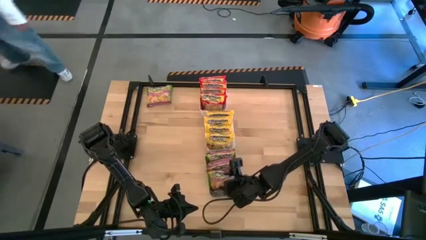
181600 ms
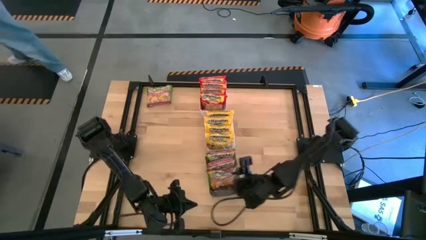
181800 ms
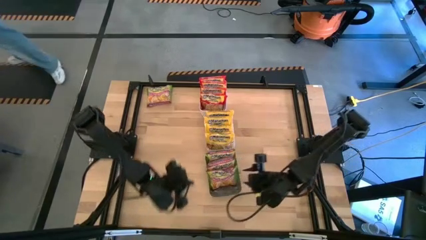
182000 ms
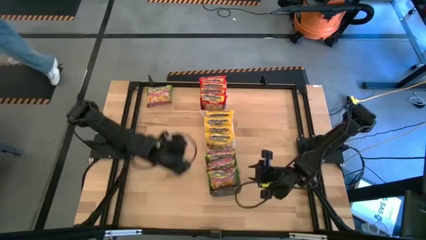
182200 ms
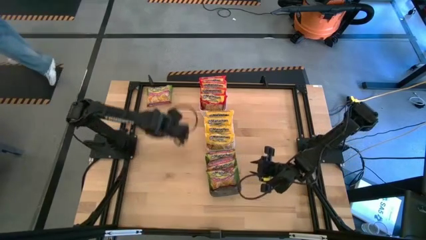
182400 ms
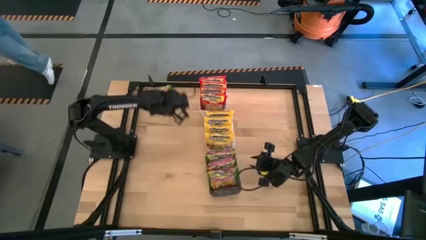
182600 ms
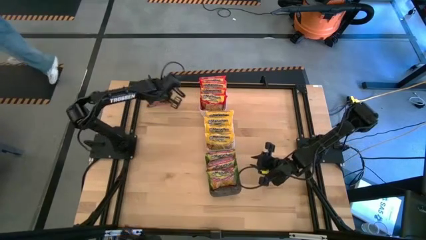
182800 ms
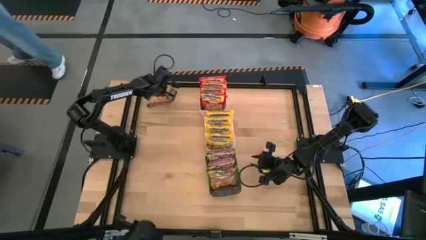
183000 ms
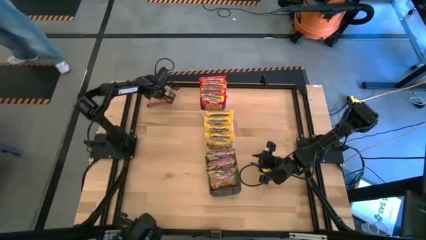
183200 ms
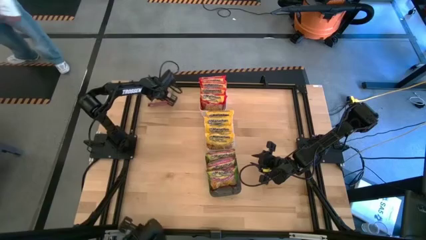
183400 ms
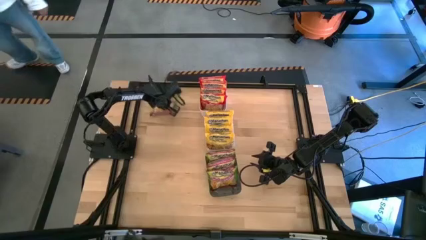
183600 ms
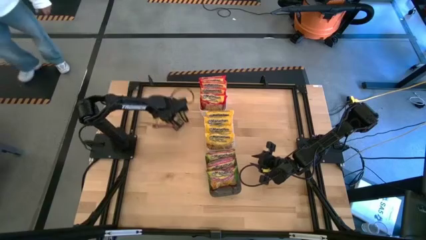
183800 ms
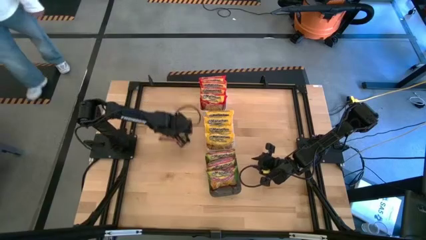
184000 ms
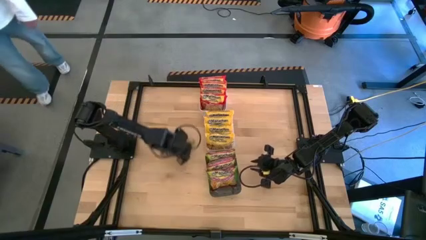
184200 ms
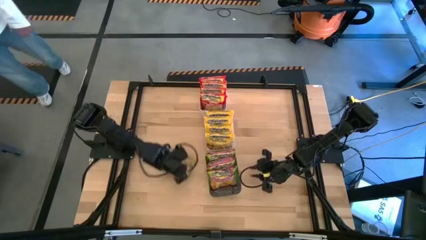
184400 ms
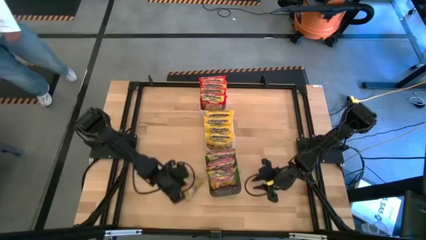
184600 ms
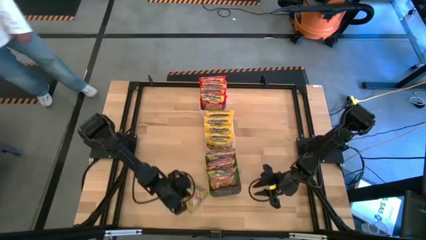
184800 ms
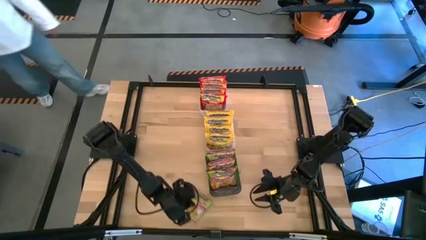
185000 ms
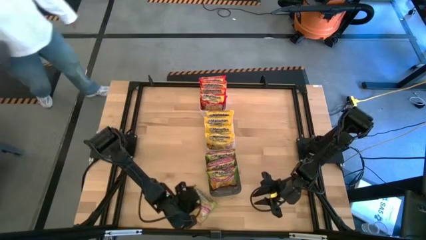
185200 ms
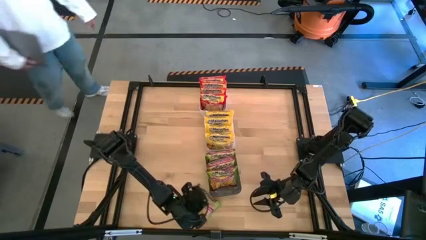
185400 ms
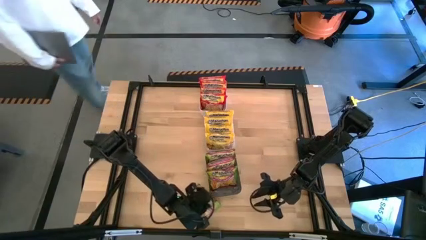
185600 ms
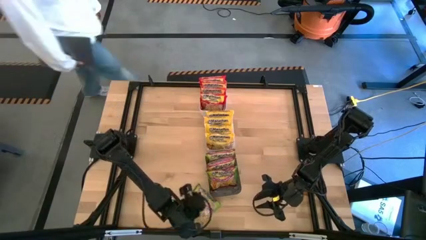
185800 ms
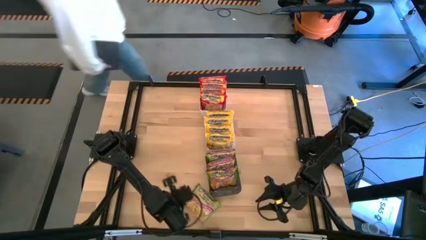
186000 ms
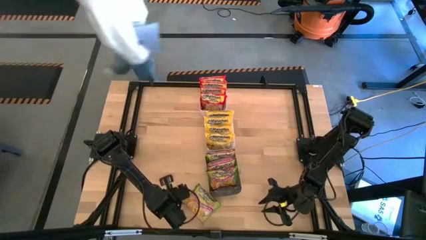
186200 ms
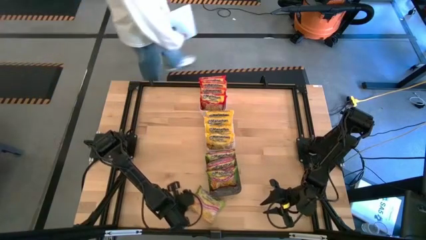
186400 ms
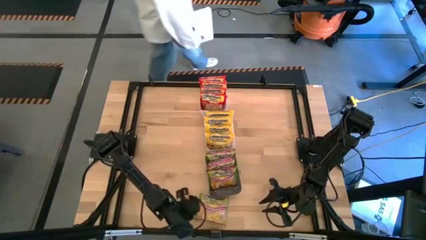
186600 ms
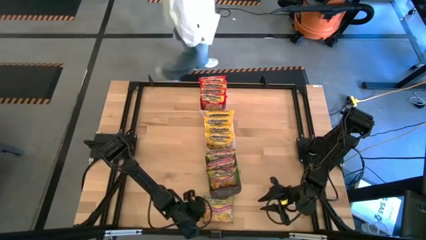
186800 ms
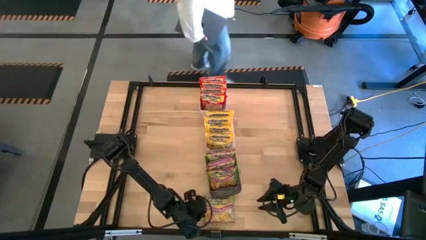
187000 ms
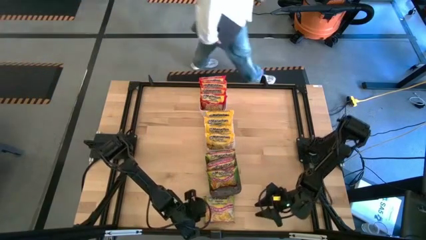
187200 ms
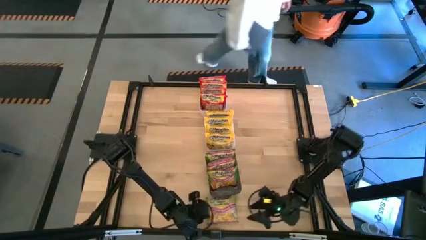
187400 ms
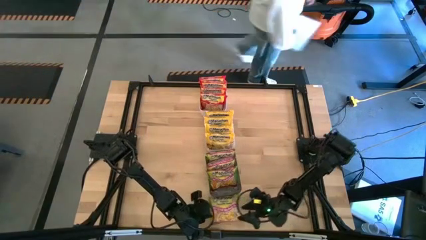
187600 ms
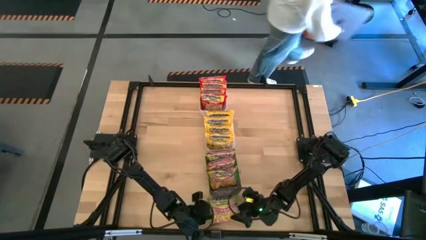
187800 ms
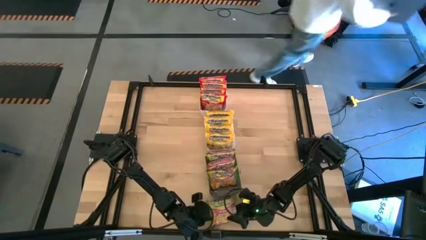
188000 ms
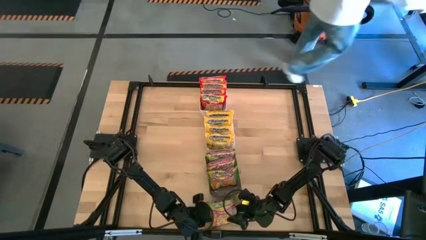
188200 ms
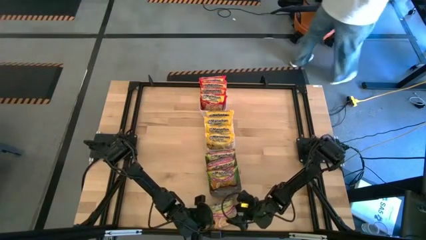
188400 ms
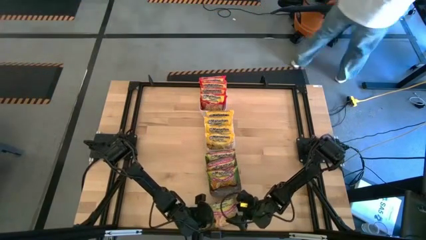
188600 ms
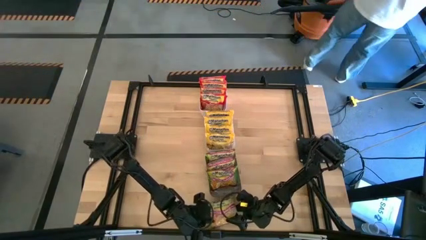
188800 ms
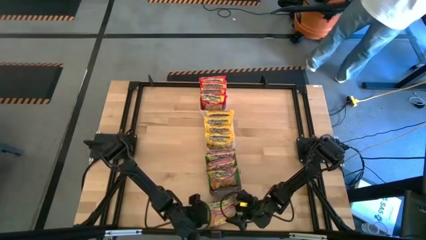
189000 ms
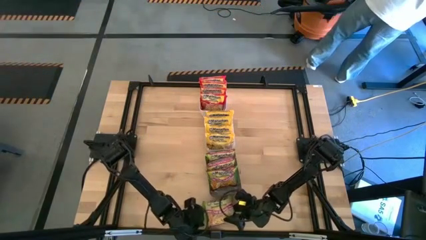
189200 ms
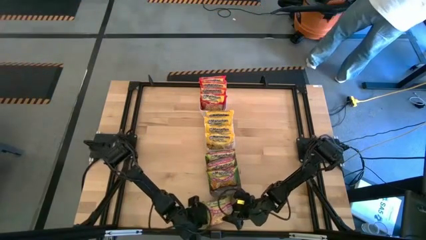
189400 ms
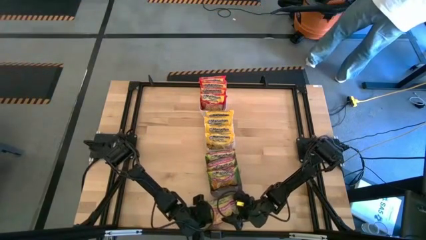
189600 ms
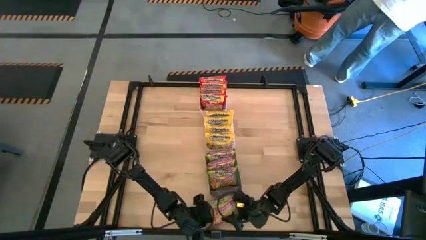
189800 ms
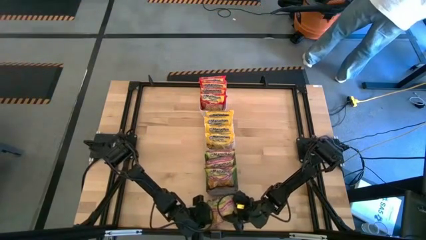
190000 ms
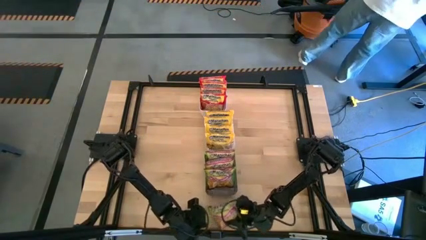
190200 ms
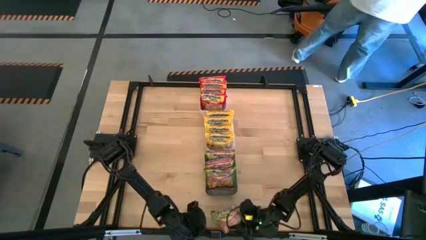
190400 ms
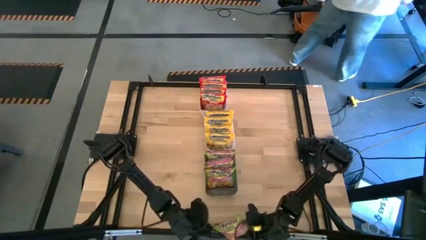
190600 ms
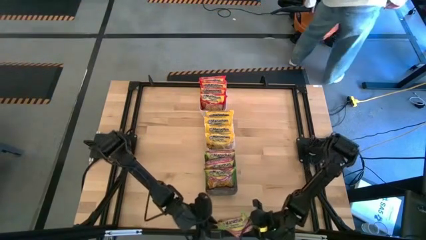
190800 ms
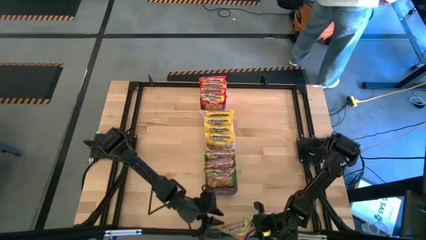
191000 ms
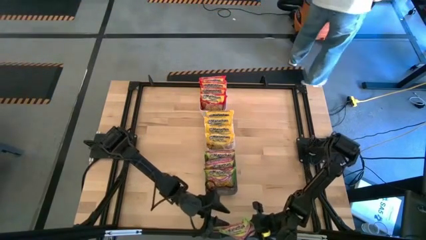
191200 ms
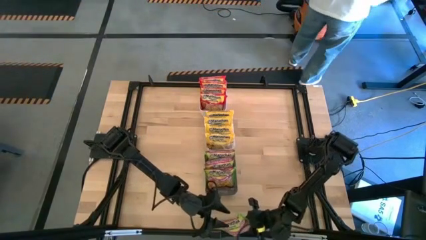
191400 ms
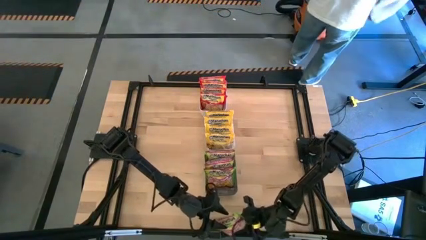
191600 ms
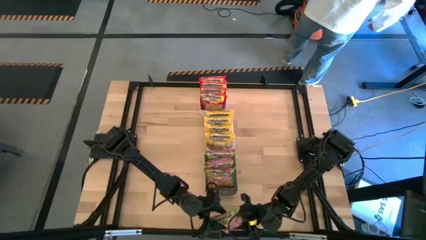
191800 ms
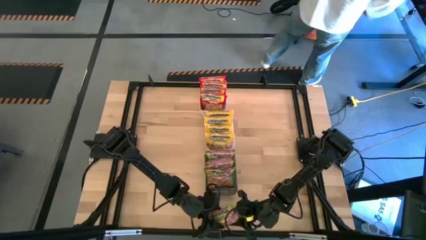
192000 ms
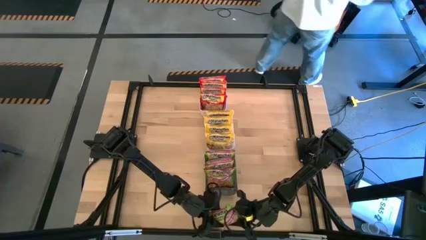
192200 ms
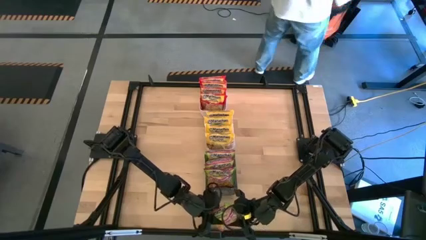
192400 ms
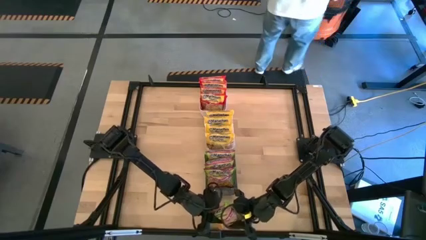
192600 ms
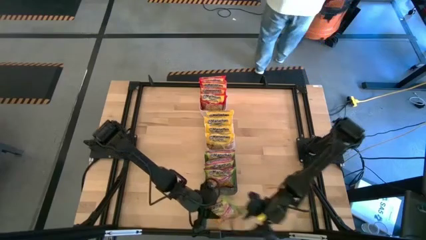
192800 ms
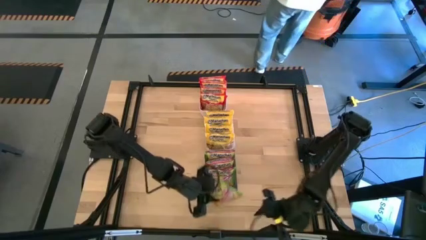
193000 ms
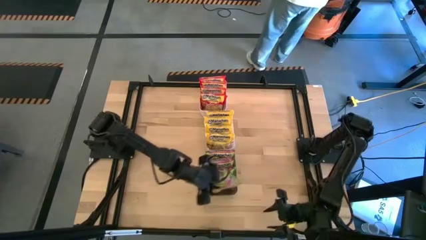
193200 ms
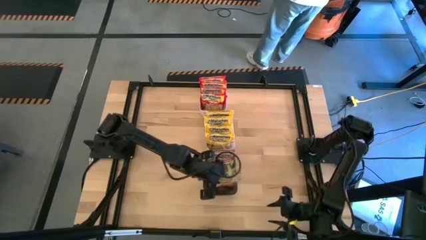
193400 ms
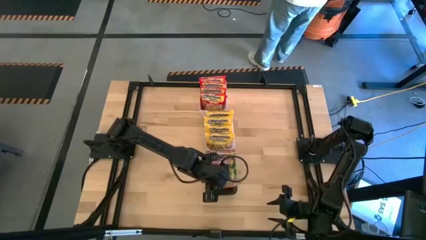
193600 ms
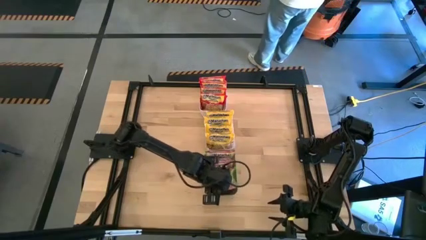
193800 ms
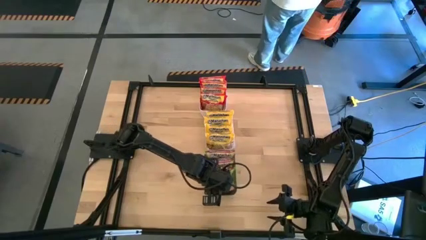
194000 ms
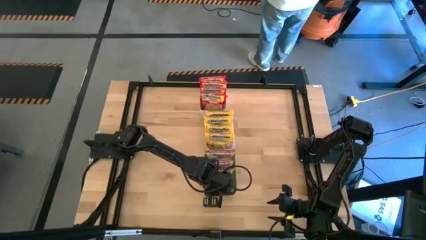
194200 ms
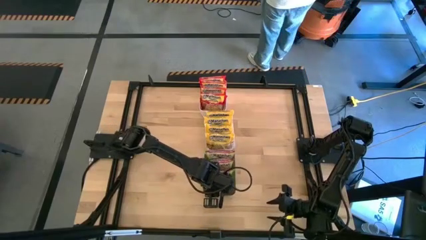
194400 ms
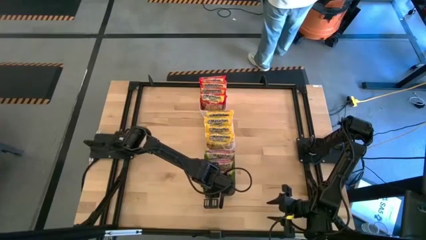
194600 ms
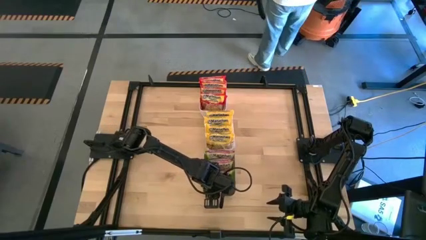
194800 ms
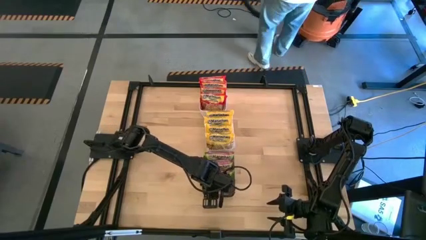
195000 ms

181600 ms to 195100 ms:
Task: Sort Maruchan noodles
Put the green noodle pack into the black bin

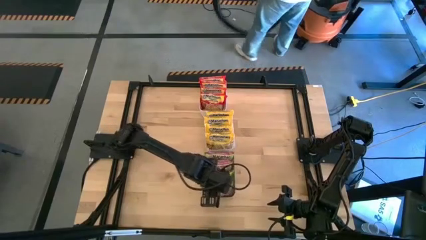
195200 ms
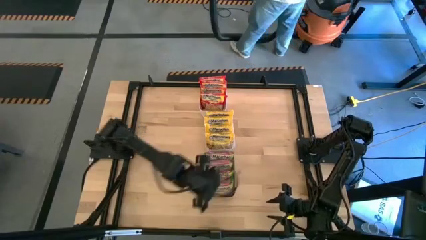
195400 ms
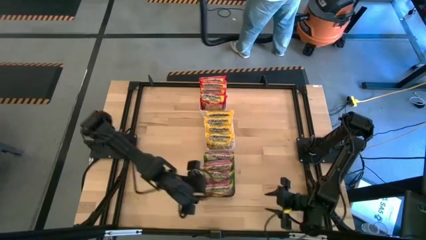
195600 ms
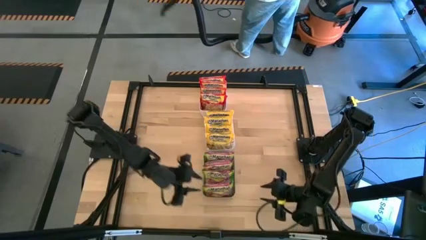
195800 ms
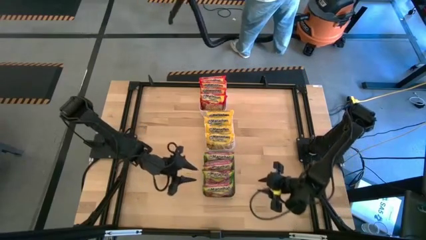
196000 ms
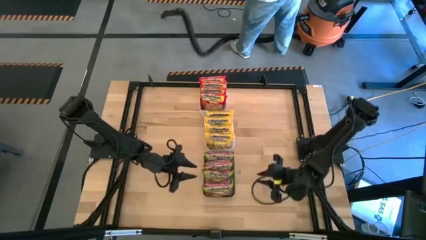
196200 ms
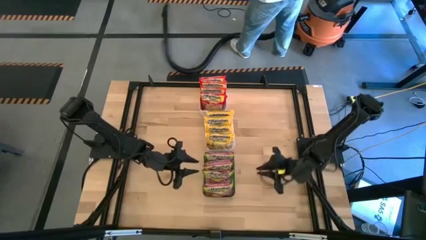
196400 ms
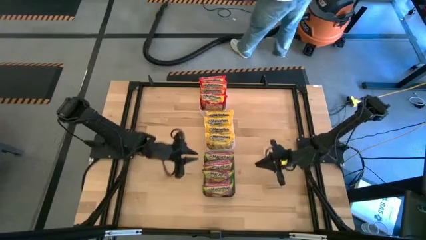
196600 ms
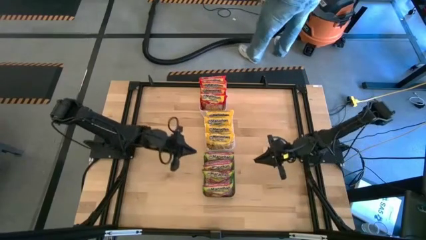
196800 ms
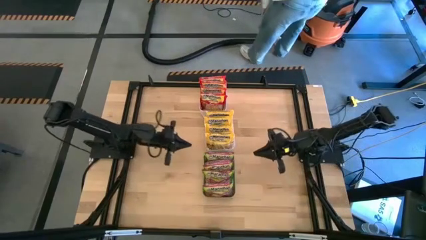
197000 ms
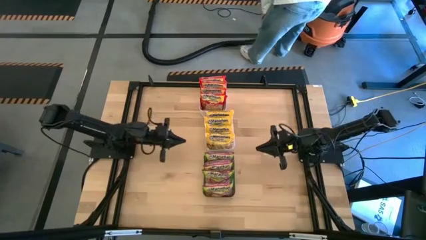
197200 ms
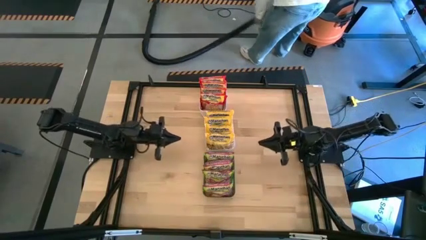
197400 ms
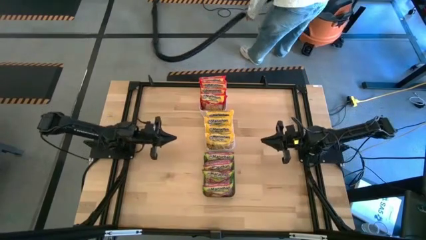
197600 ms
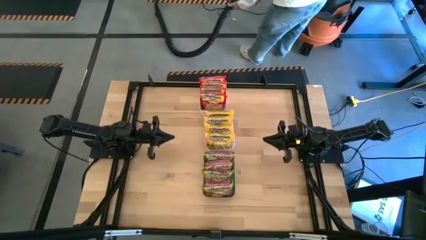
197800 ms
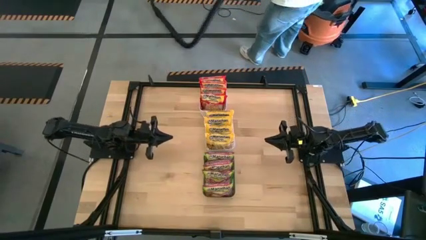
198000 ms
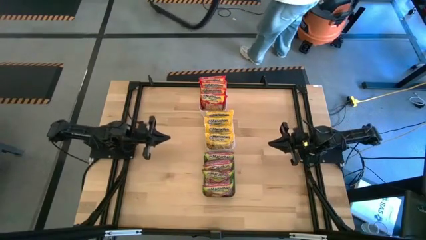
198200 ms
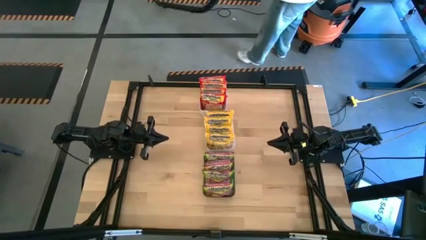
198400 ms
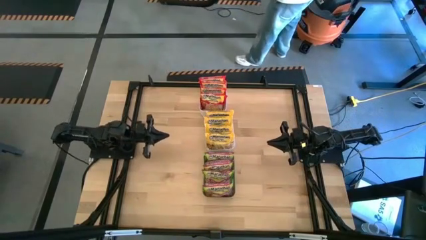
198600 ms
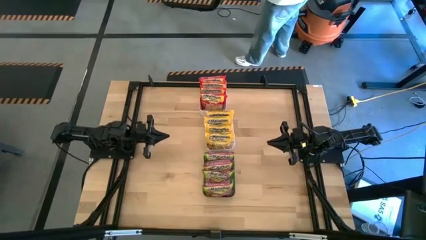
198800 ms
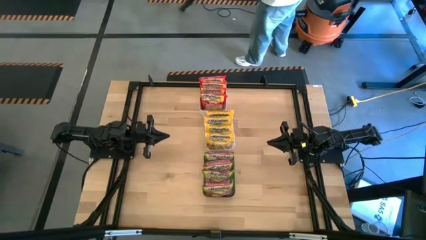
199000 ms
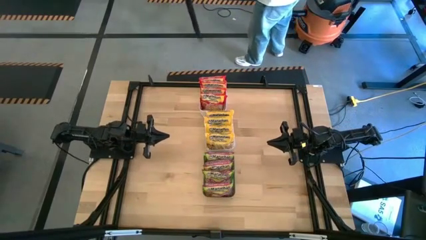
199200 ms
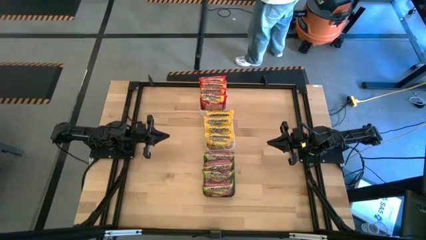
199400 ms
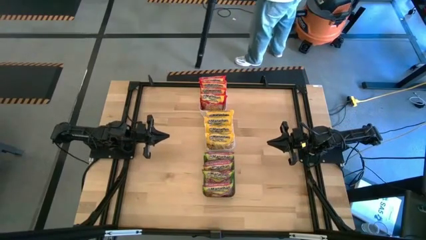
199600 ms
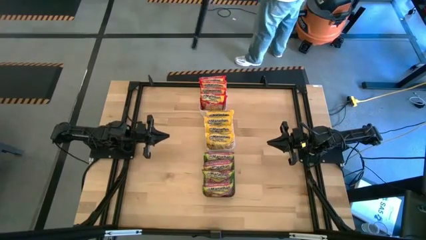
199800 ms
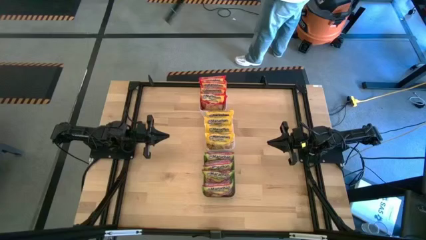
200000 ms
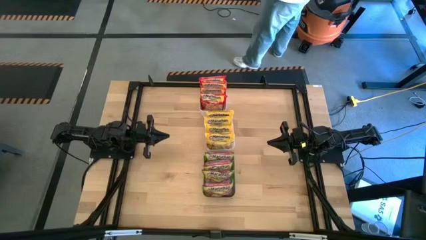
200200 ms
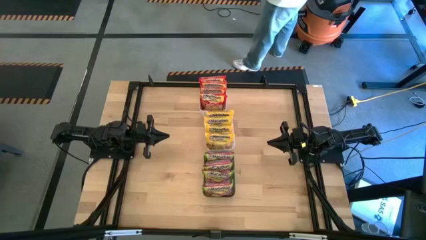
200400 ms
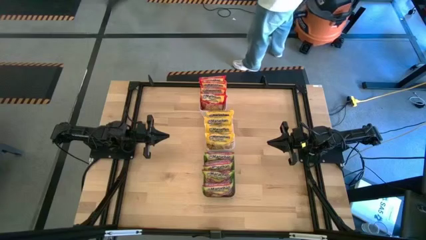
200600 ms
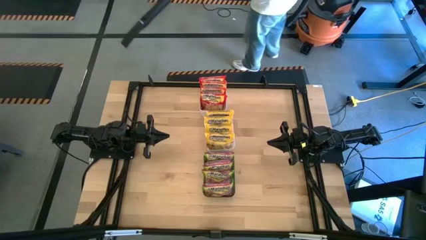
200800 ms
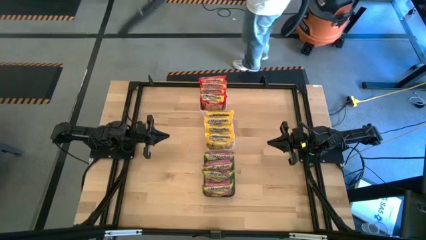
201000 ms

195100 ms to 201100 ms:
Return to Home Position
